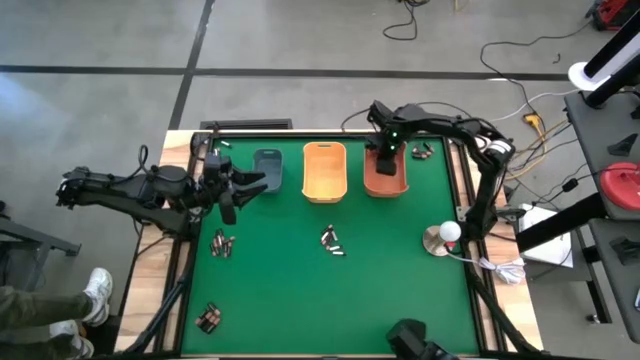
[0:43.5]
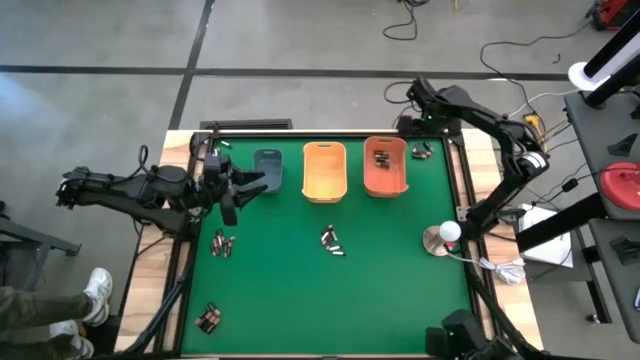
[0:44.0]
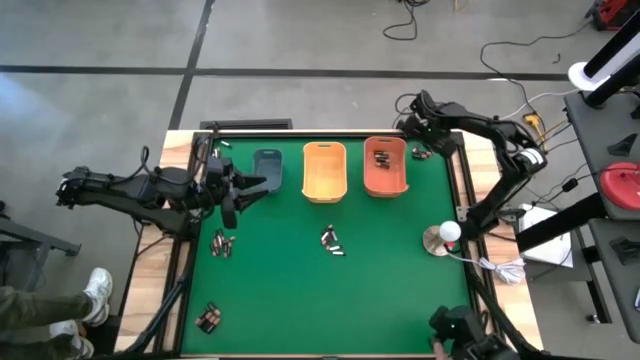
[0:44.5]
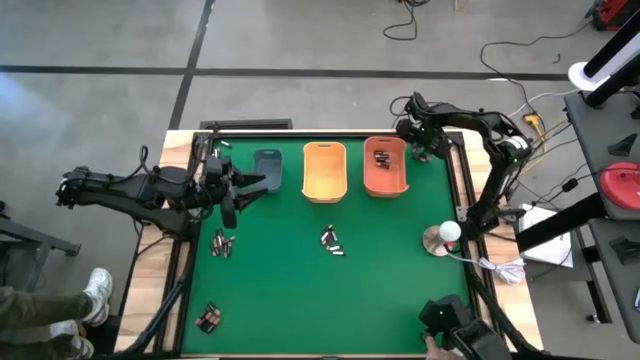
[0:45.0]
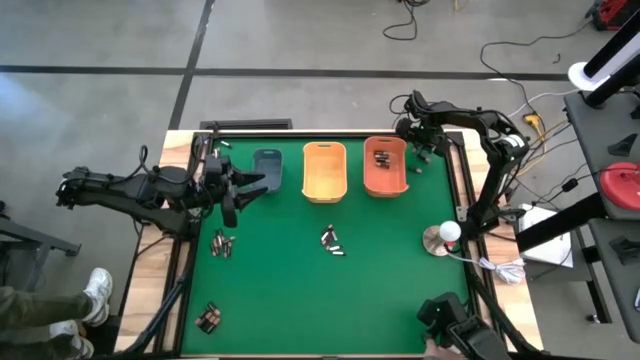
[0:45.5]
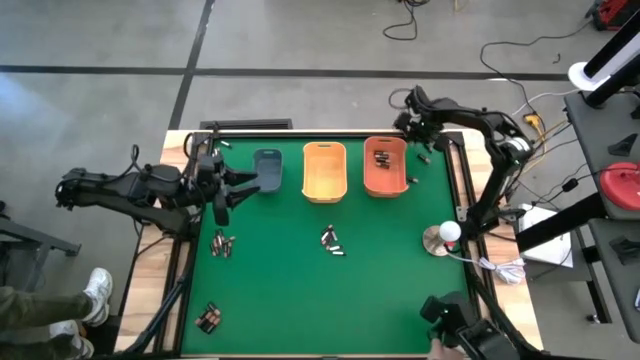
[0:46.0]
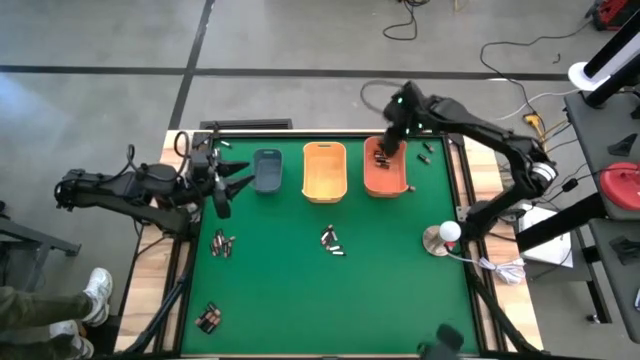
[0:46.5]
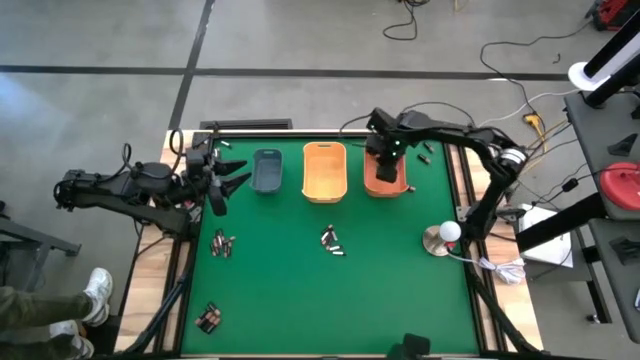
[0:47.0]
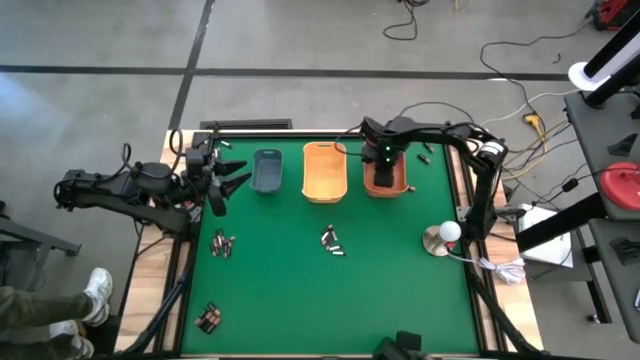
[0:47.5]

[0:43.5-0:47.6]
Task: Sort batteries
Put the black battery into the orange bin

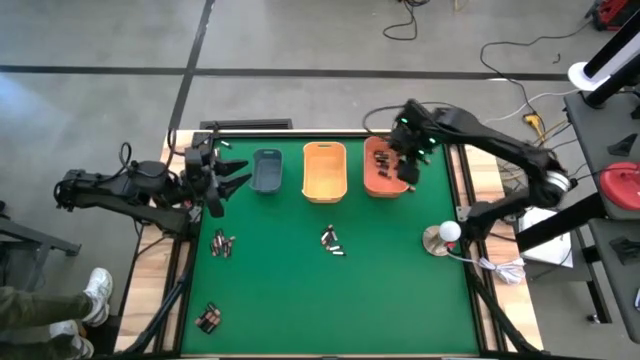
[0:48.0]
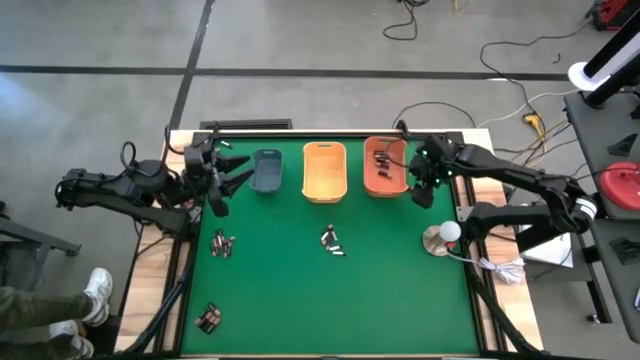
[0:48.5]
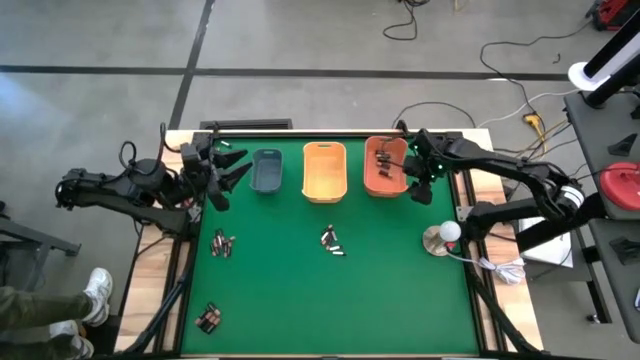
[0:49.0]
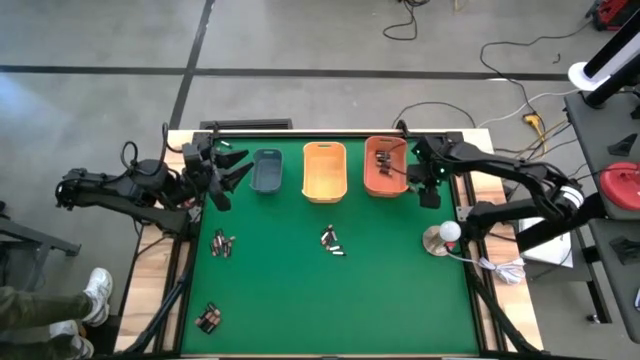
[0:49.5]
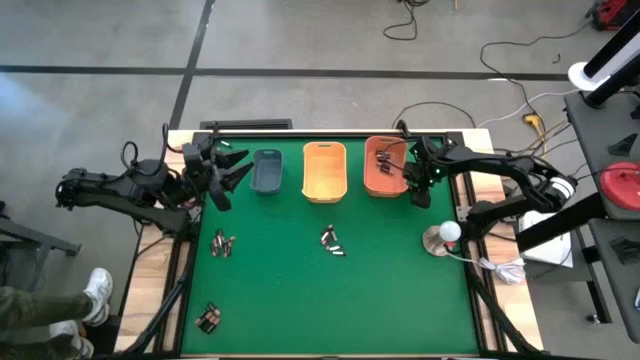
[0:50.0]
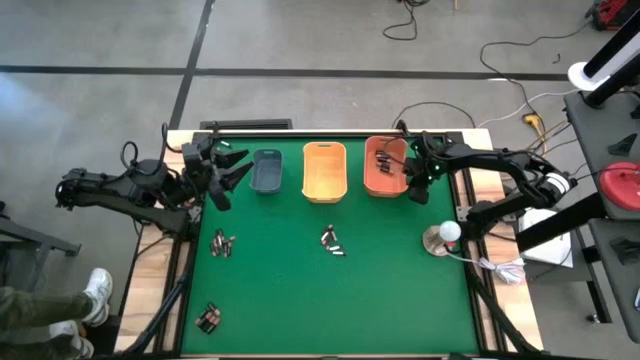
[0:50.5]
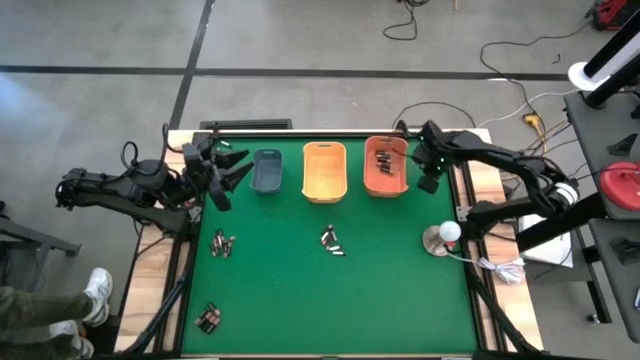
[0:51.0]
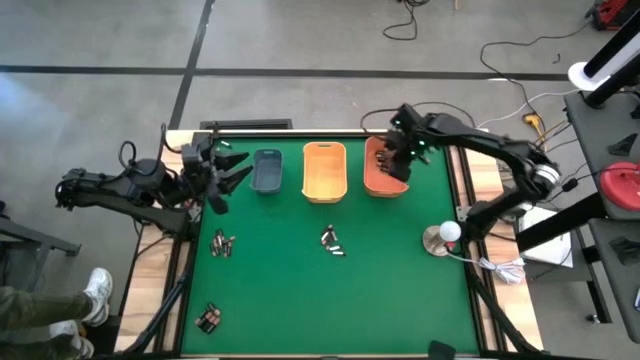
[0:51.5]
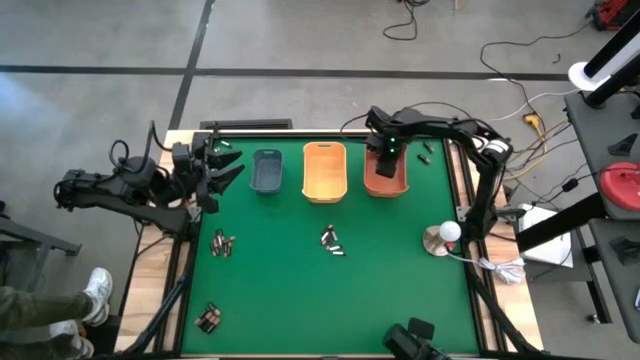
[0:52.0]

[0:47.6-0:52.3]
Put the black battery into the orange bin

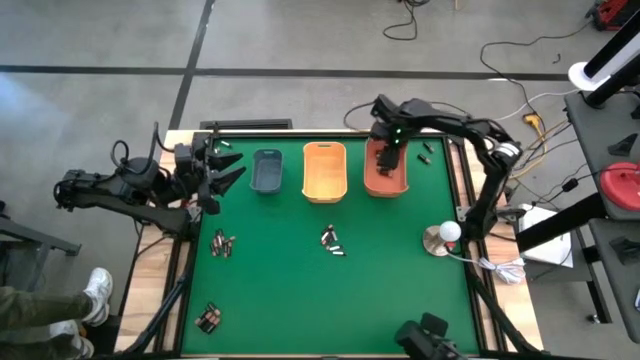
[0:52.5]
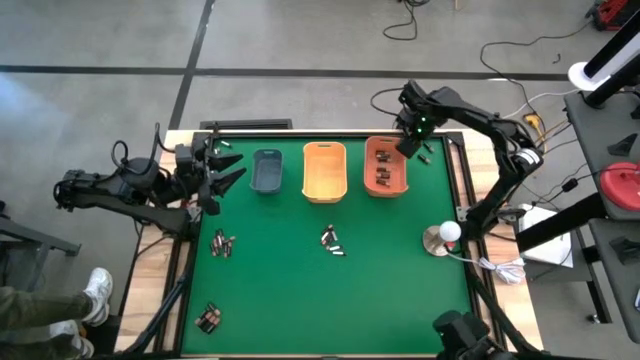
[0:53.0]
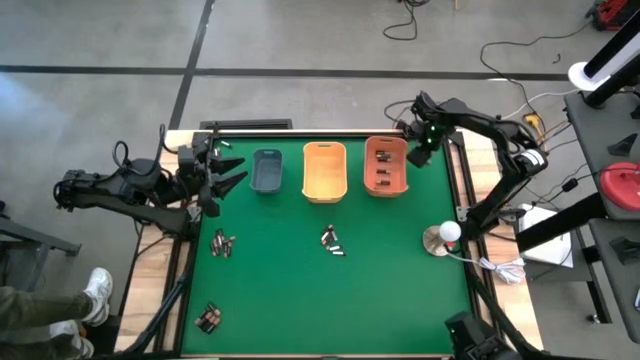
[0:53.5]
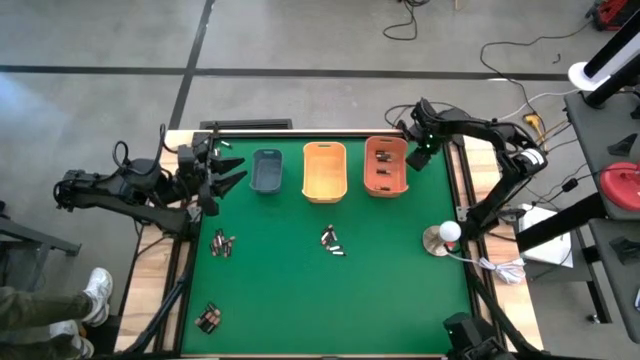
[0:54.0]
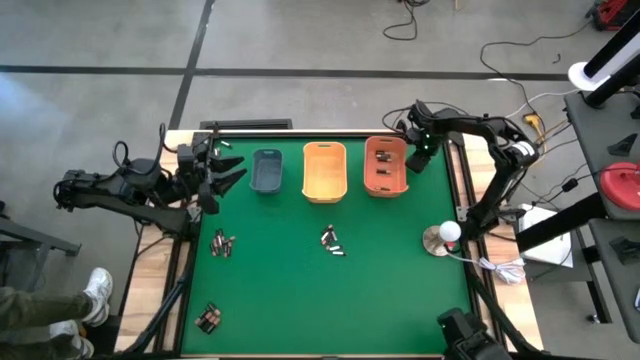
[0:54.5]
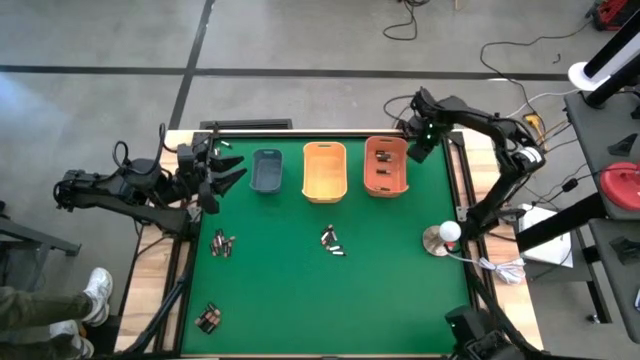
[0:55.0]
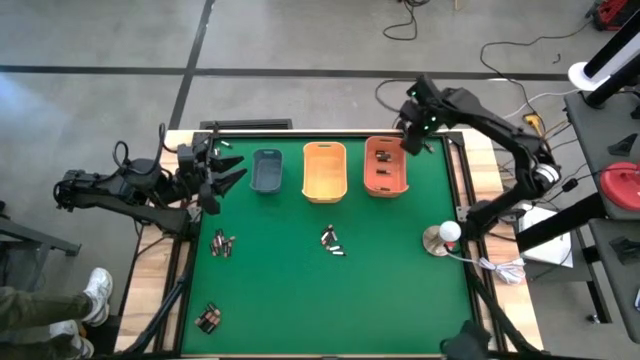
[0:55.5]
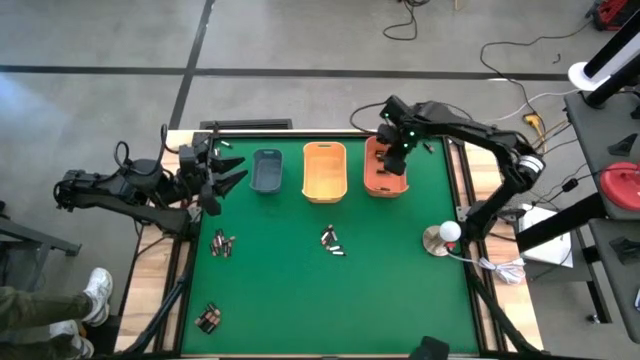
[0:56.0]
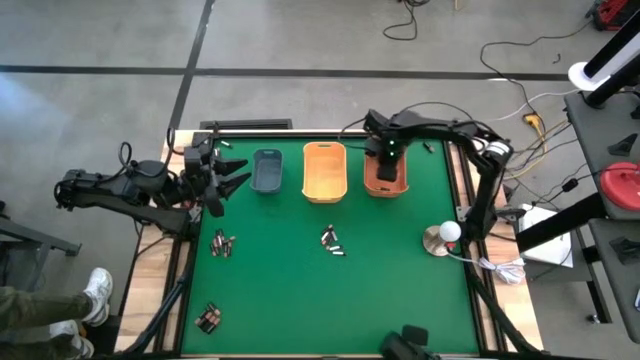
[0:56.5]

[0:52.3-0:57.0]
Put the black battery into the orange bin

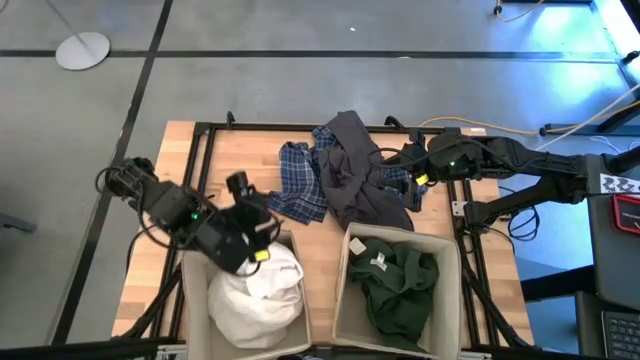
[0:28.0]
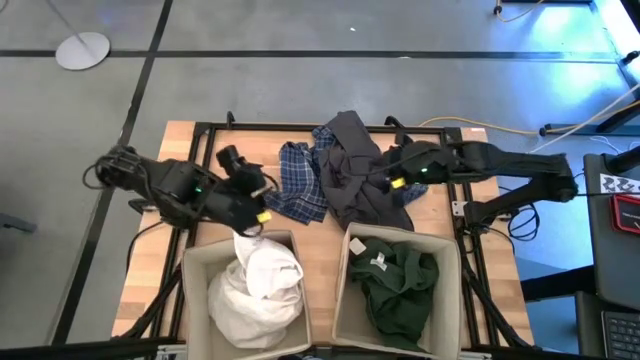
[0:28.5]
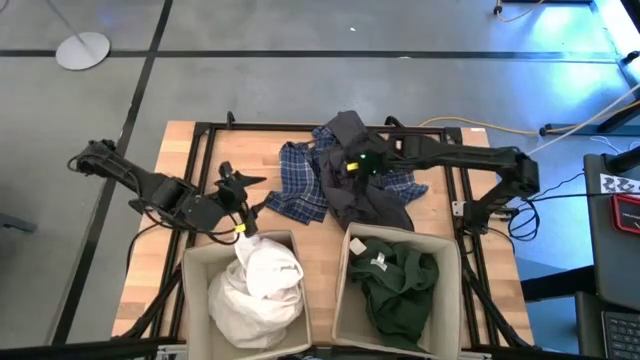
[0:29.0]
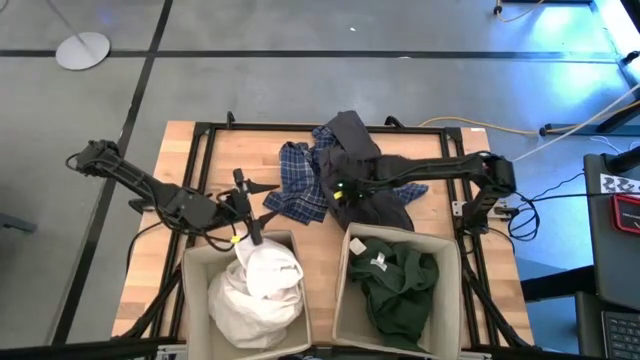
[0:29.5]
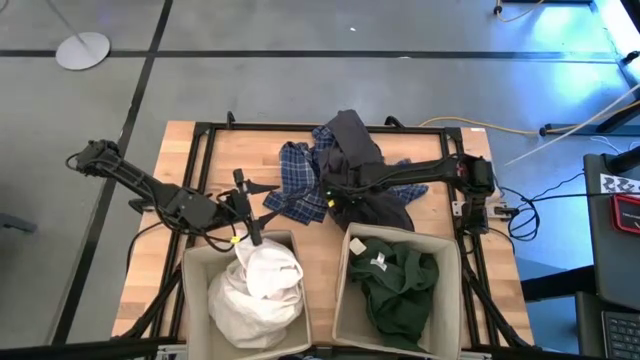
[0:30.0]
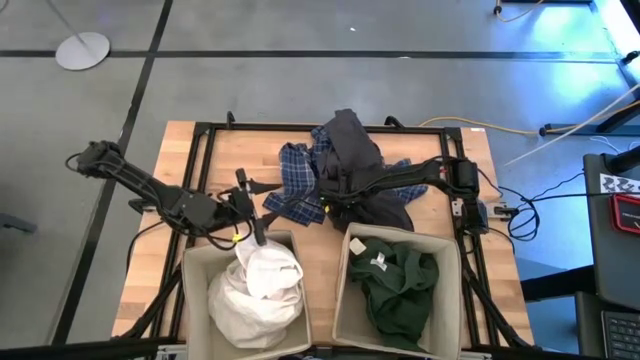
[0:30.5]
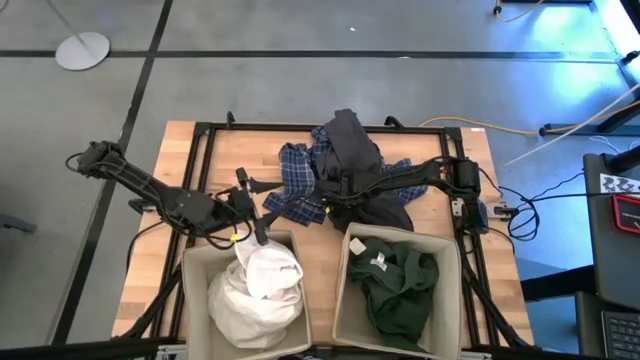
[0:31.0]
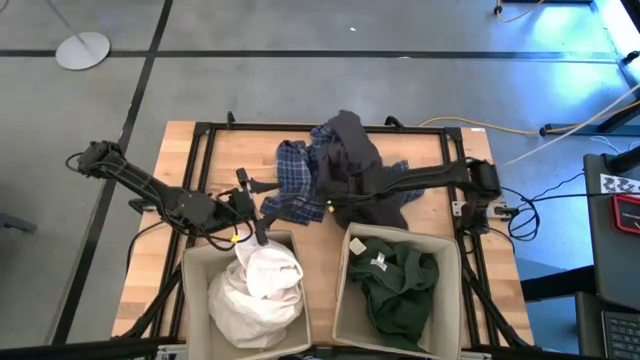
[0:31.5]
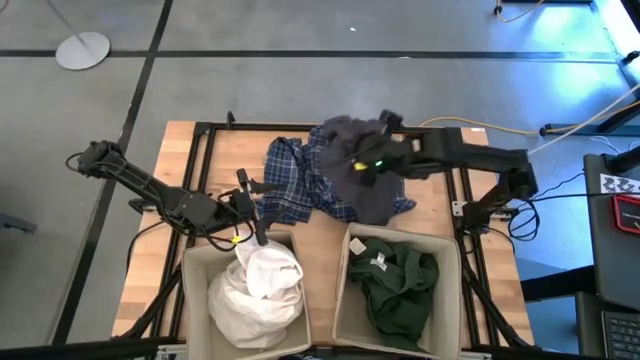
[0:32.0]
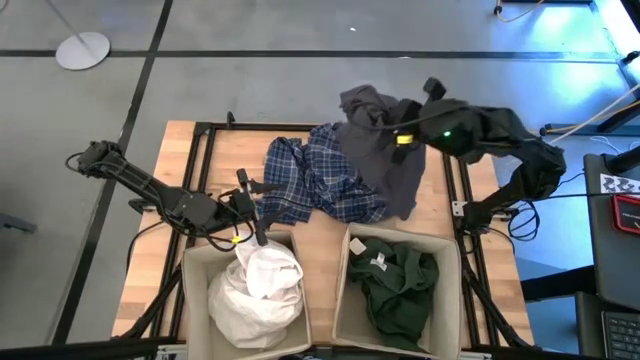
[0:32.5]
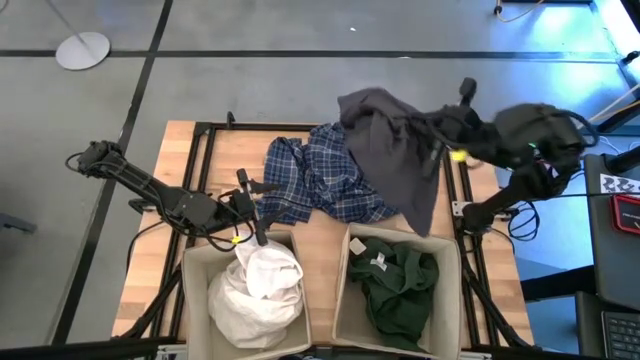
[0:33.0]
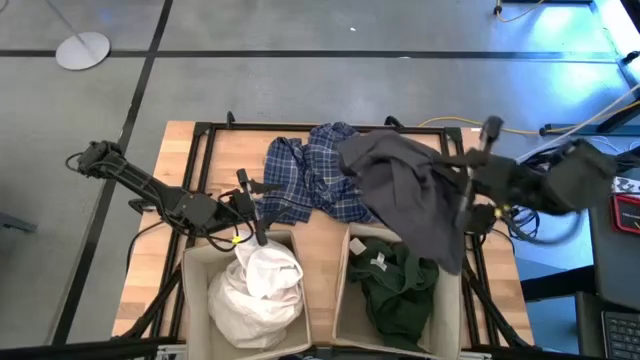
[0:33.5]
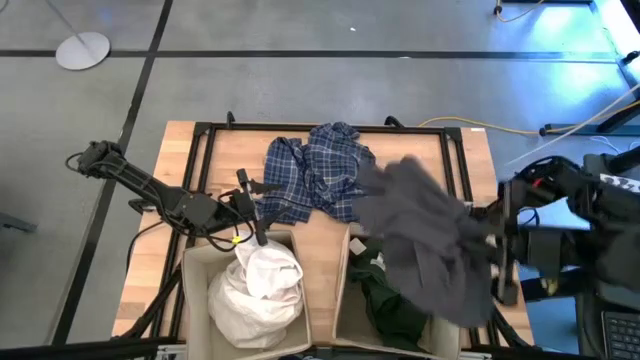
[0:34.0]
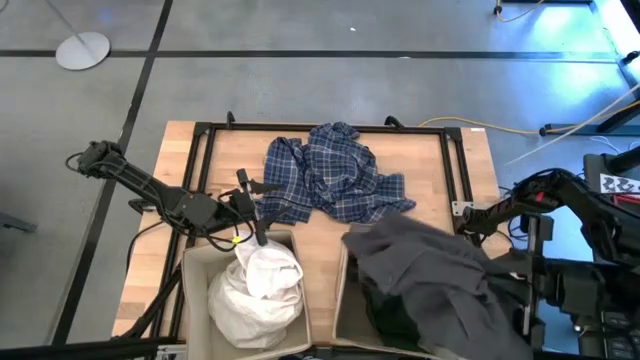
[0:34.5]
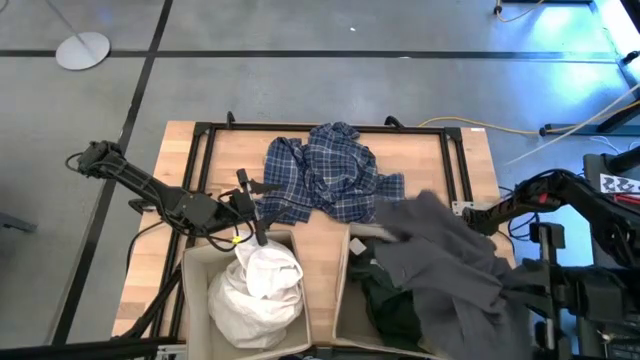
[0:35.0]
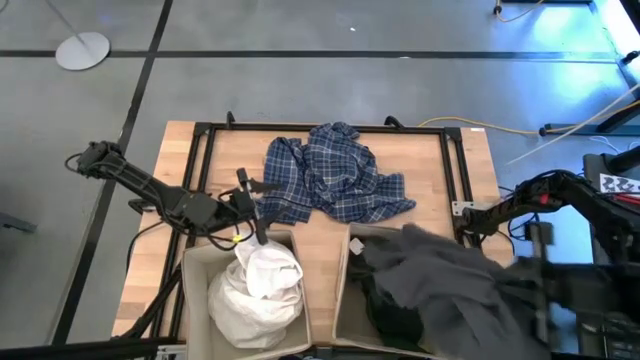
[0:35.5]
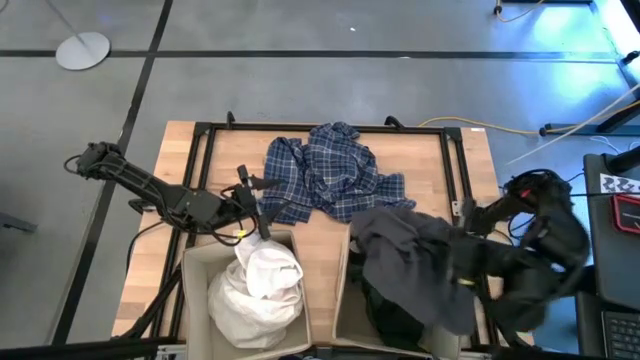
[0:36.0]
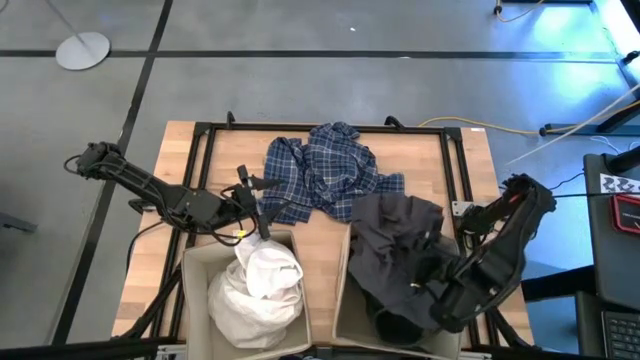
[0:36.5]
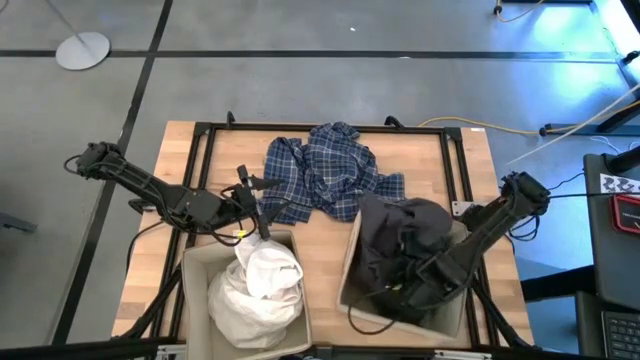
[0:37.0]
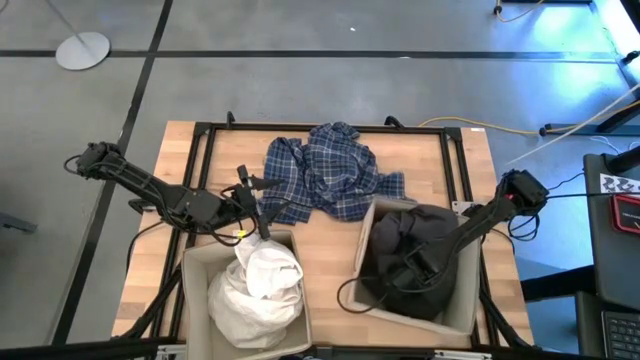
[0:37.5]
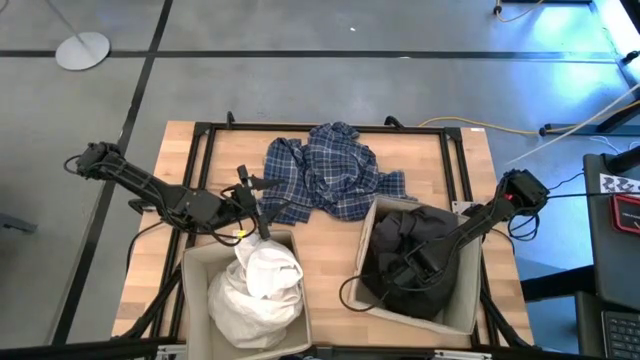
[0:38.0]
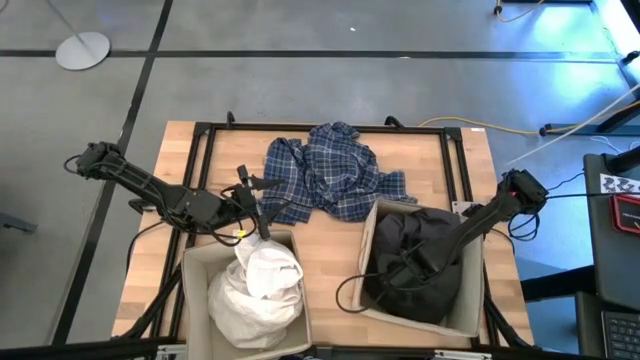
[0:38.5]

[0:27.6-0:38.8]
Task: Sort clothes
Put the black shirt into the right laundry organizer
